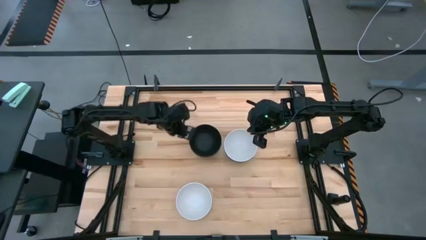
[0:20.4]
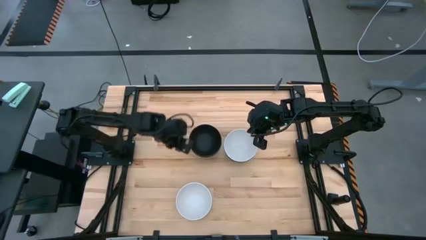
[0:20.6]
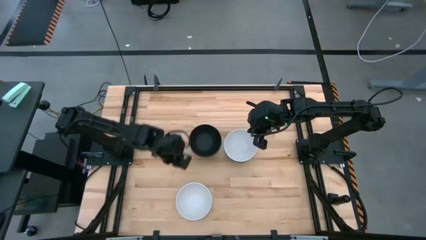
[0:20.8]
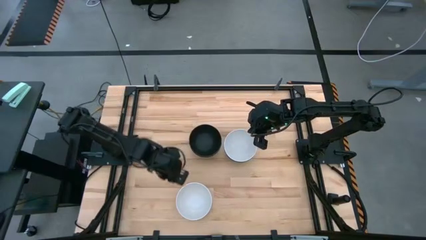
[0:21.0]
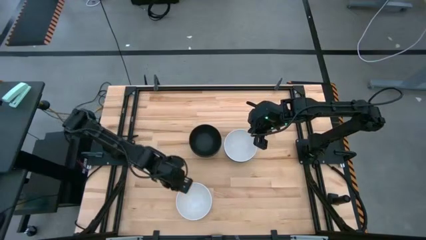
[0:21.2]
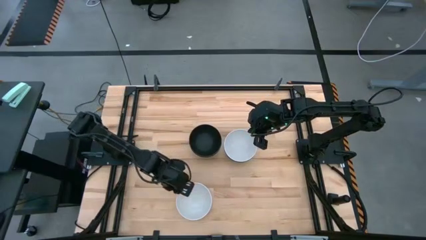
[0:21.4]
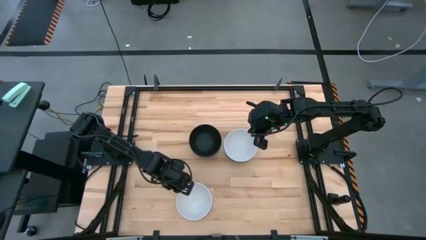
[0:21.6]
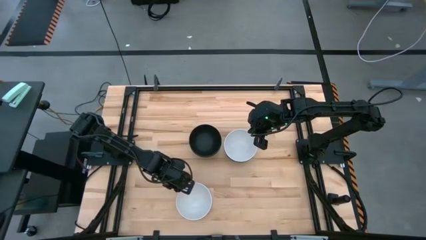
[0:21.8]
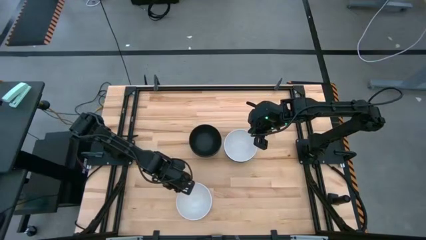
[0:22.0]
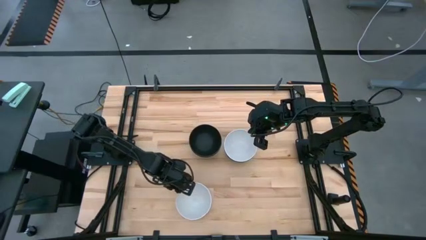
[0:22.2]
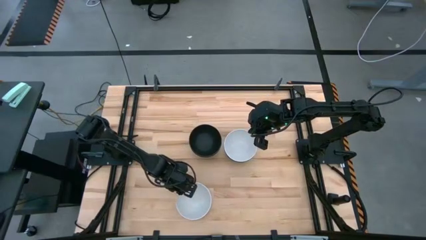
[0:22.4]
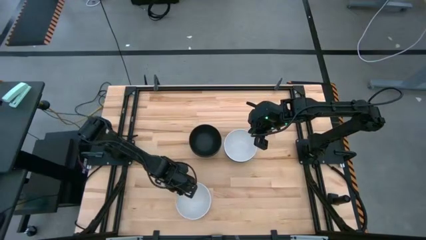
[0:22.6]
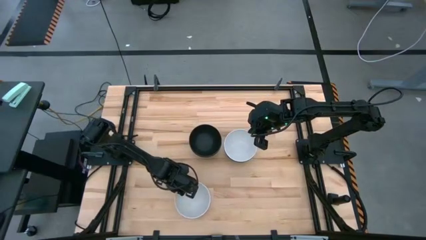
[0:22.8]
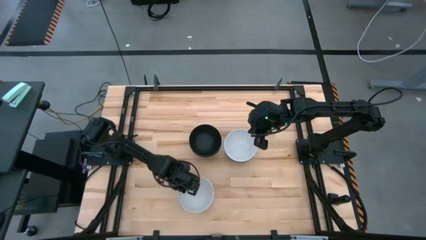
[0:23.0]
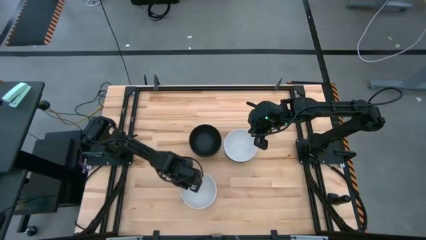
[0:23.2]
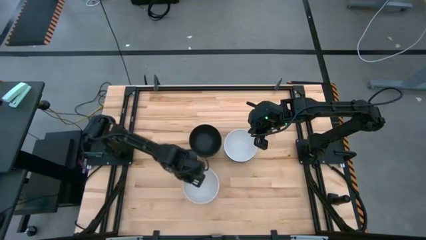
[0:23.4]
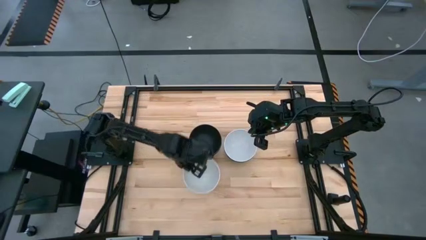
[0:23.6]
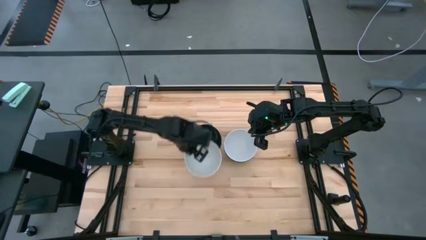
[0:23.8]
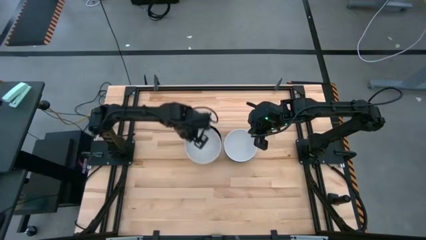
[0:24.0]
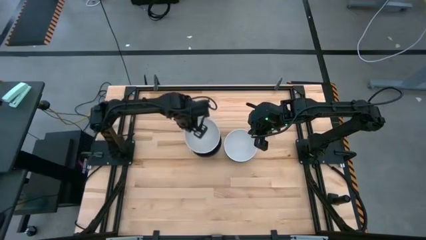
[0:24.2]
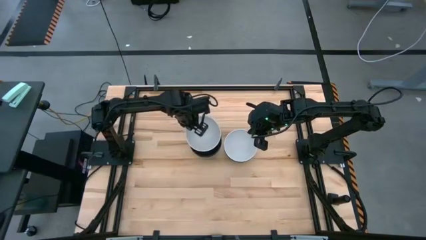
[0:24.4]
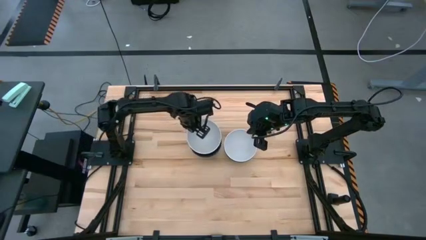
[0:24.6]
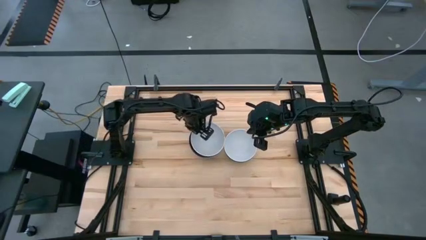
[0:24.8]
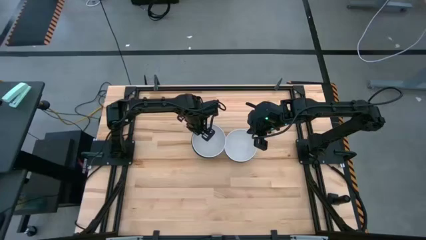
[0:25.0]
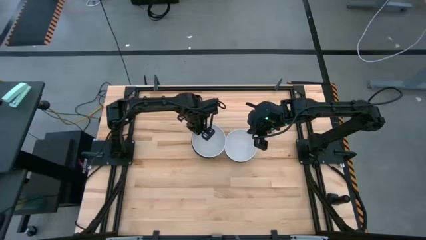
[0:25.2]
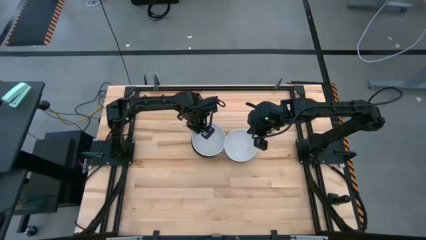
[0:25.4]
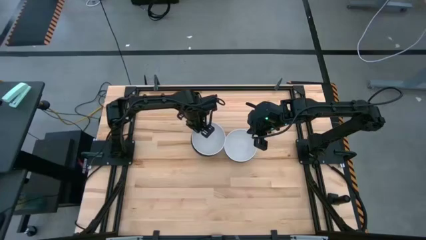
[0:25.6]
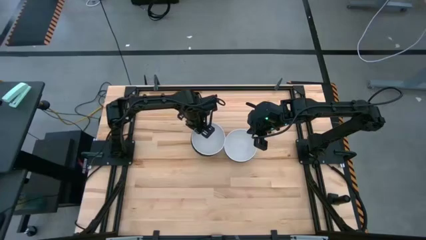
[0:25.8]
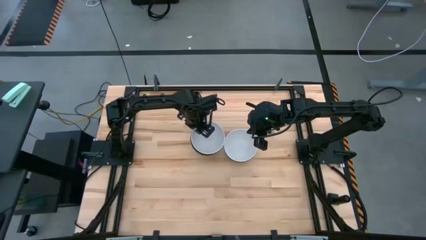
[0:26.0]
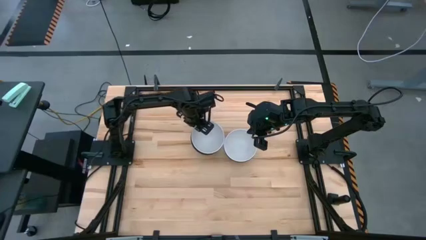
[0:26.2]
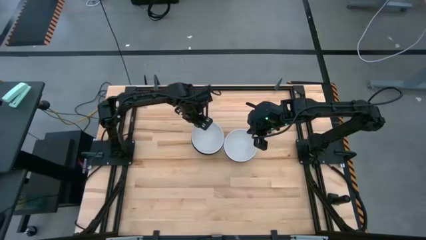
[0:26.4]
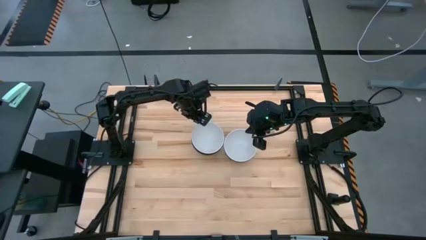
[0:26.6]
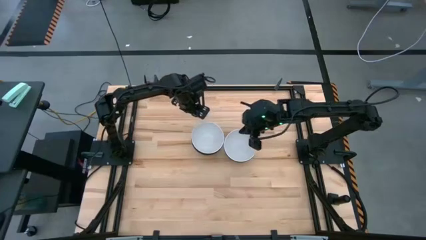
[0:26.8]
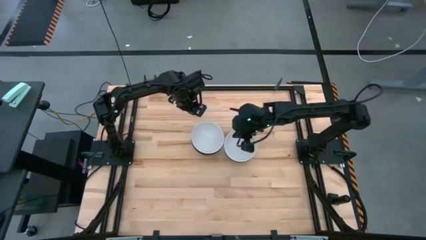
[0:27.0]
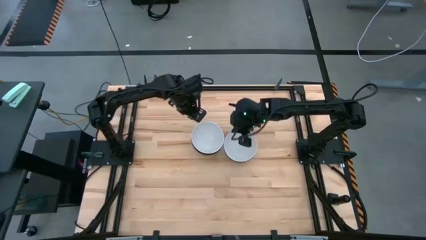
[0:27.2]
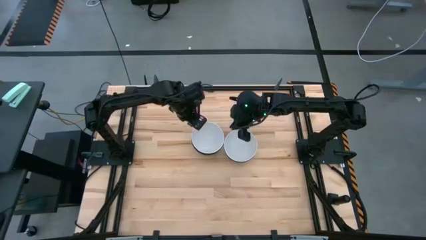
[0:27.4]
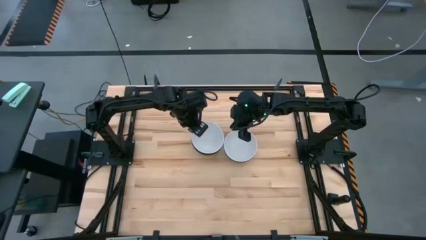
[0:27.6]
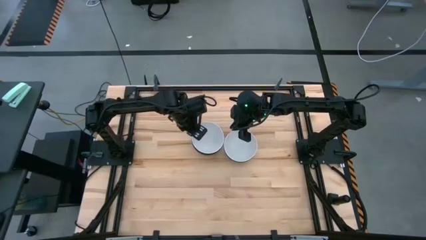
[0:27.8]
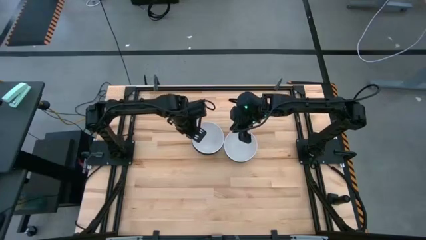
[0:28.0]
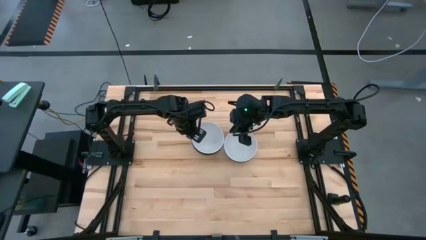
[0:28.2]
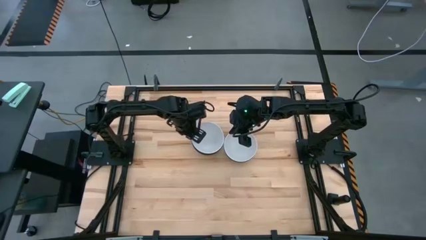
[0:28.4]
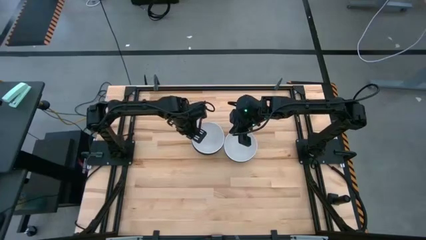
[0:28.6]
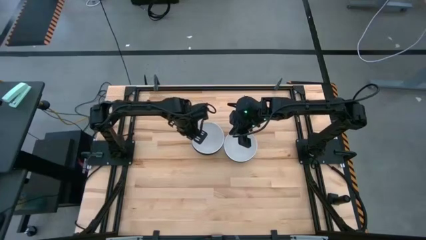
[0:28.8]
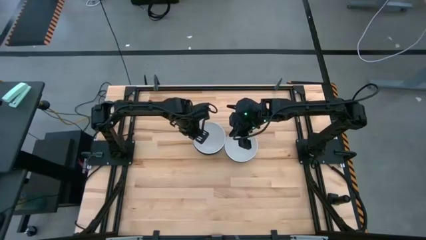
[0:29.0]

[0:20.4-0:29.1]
Task: Nest bowls inside each other
Stack the white bowl on top of the black bowl

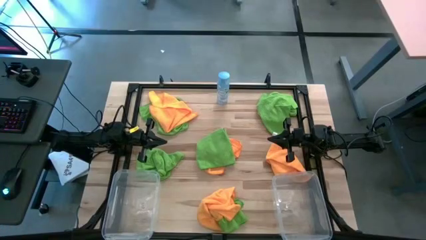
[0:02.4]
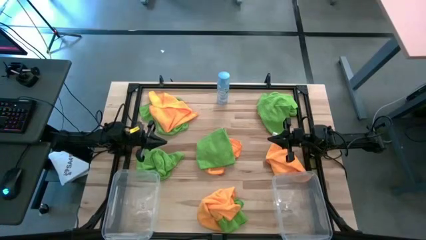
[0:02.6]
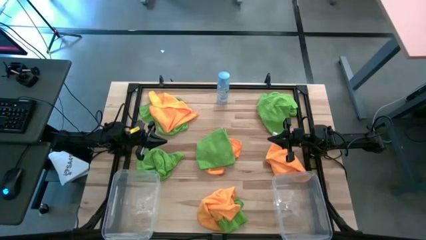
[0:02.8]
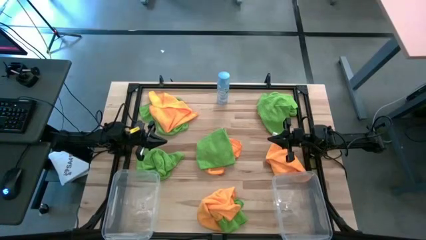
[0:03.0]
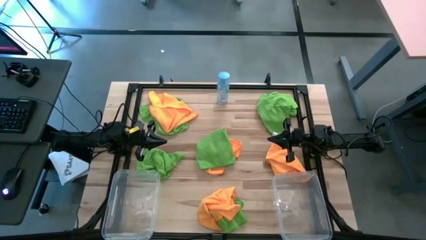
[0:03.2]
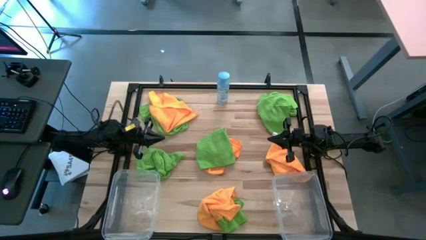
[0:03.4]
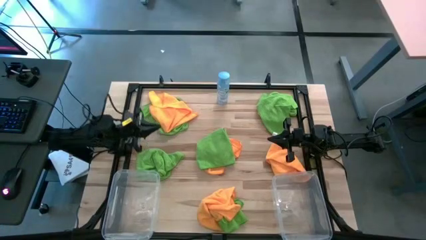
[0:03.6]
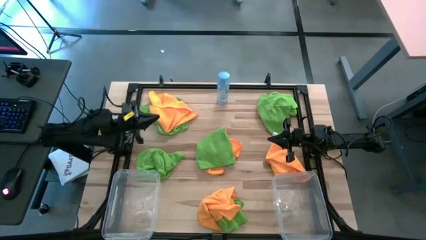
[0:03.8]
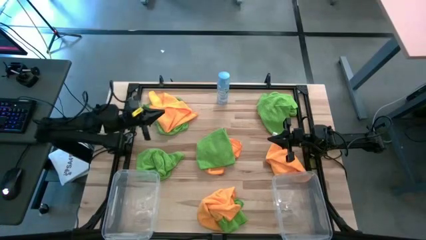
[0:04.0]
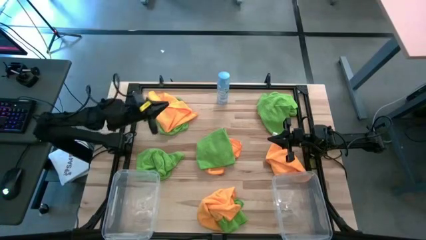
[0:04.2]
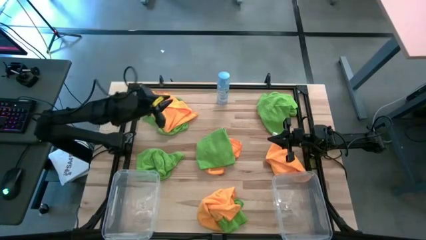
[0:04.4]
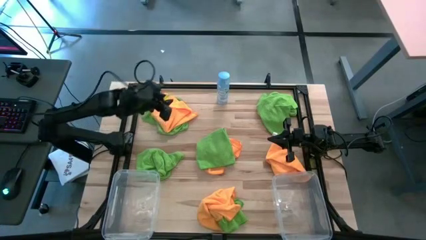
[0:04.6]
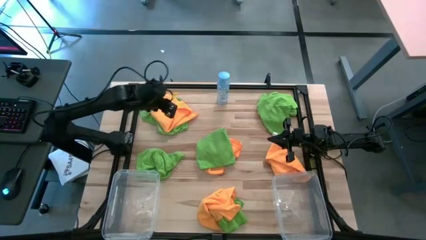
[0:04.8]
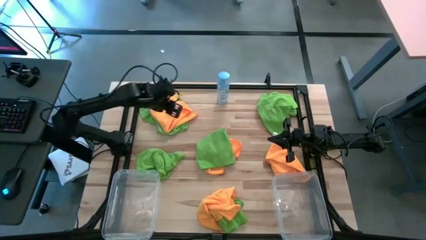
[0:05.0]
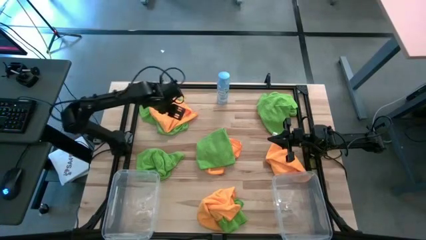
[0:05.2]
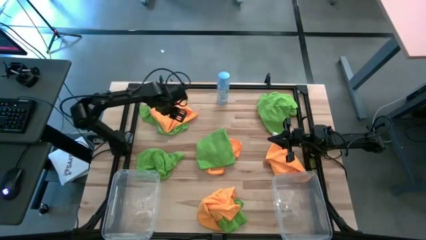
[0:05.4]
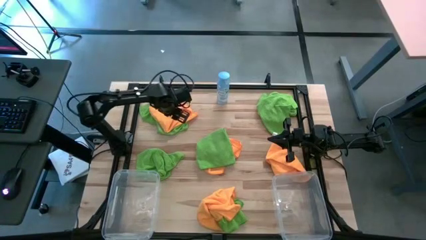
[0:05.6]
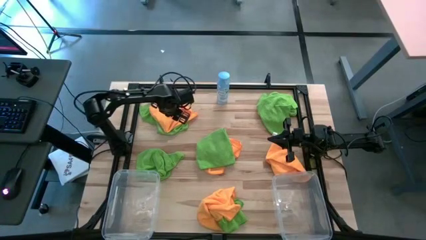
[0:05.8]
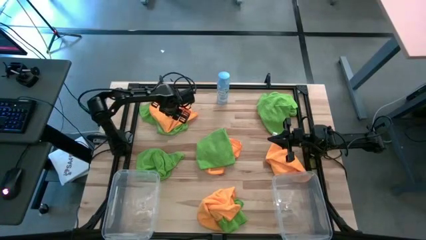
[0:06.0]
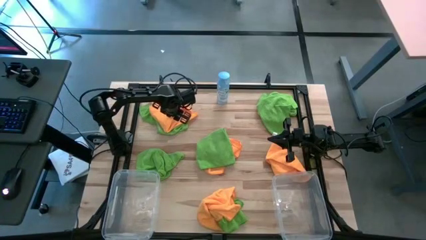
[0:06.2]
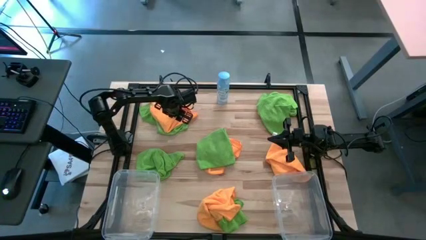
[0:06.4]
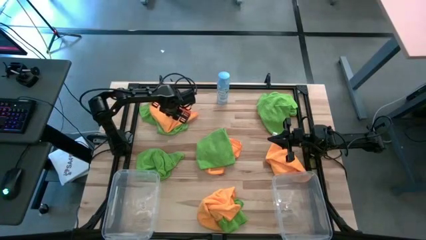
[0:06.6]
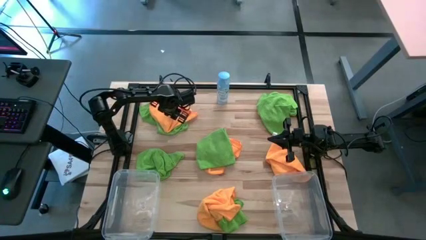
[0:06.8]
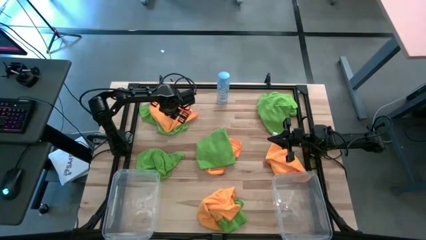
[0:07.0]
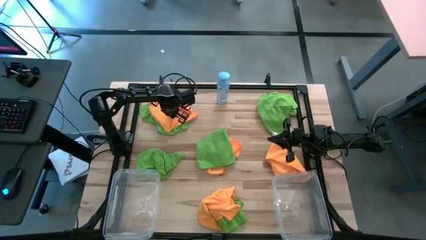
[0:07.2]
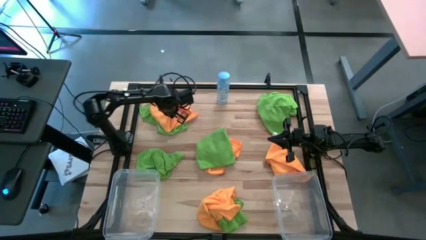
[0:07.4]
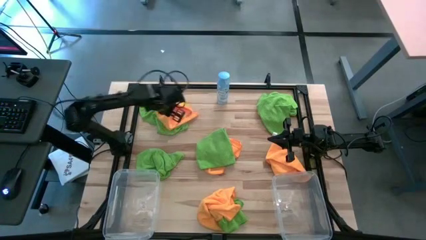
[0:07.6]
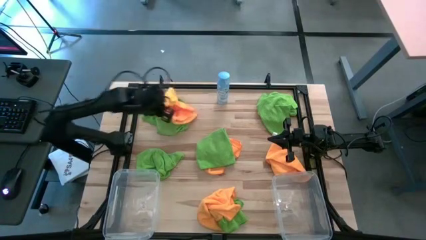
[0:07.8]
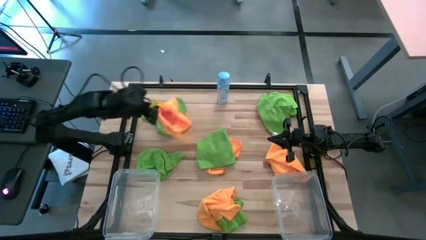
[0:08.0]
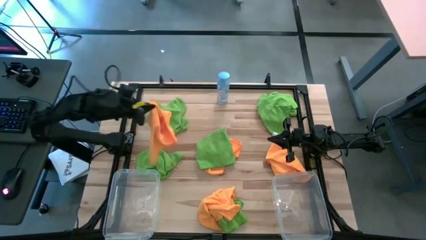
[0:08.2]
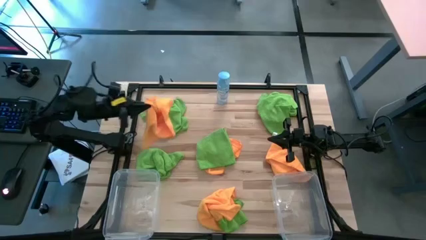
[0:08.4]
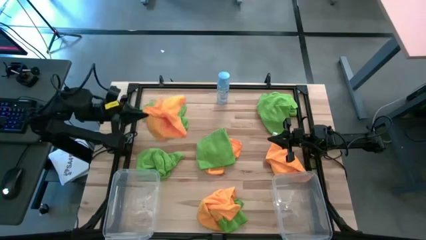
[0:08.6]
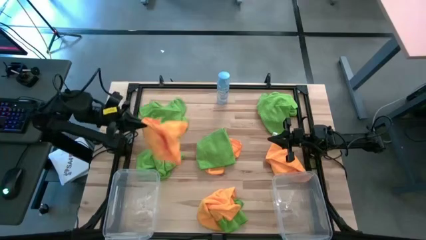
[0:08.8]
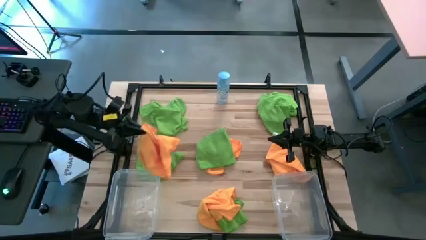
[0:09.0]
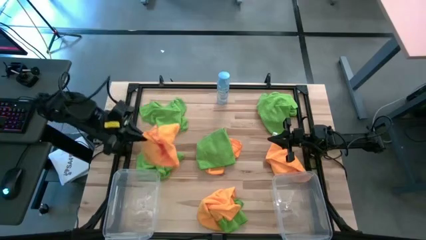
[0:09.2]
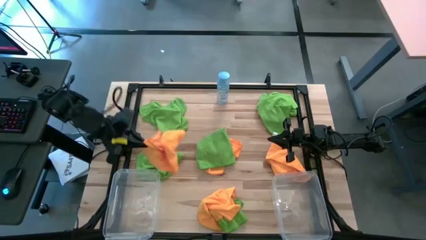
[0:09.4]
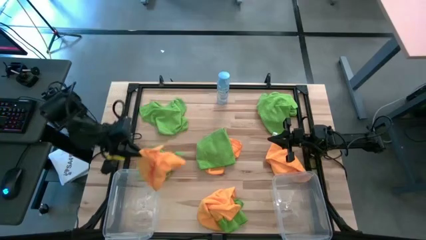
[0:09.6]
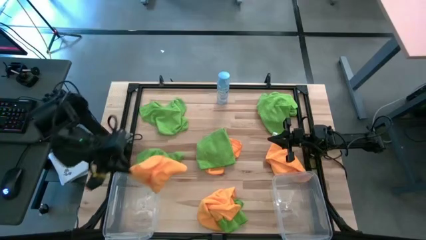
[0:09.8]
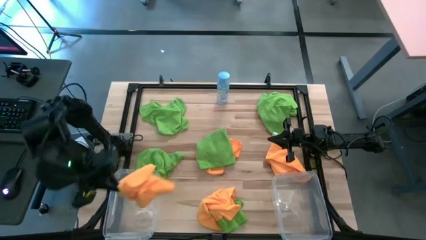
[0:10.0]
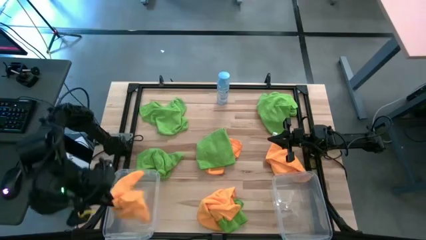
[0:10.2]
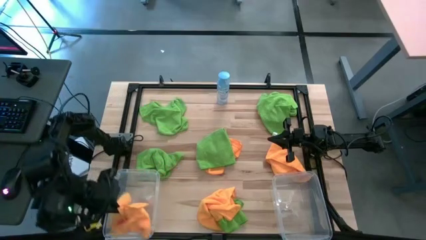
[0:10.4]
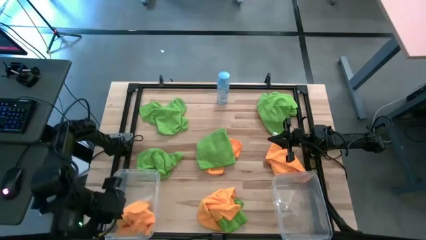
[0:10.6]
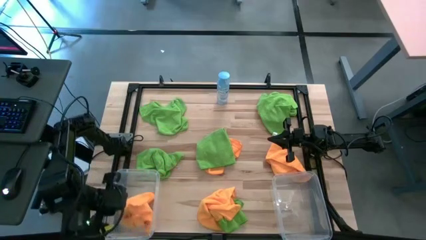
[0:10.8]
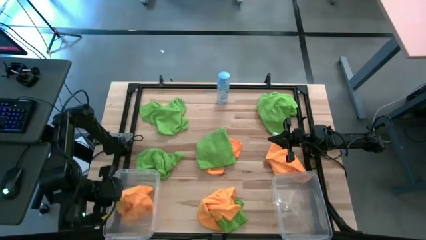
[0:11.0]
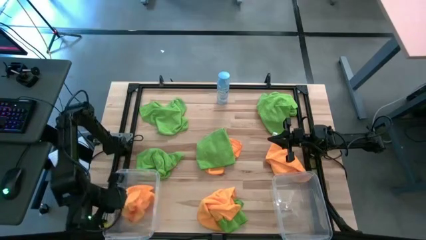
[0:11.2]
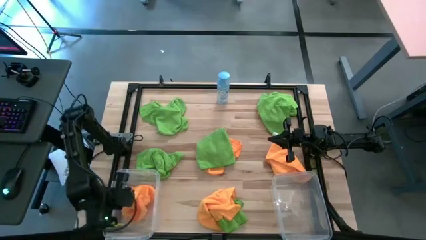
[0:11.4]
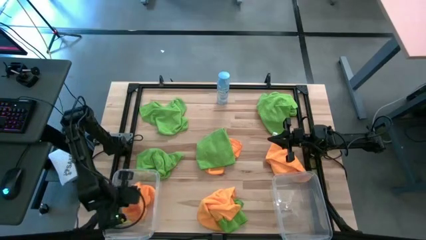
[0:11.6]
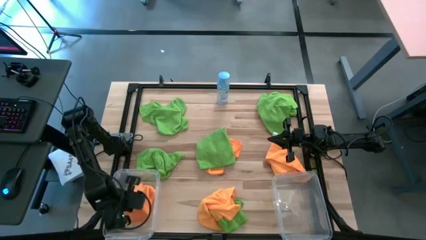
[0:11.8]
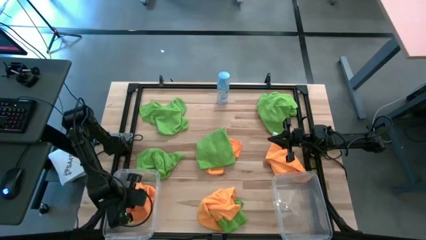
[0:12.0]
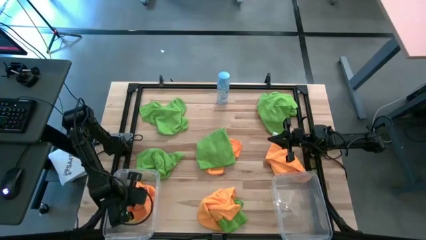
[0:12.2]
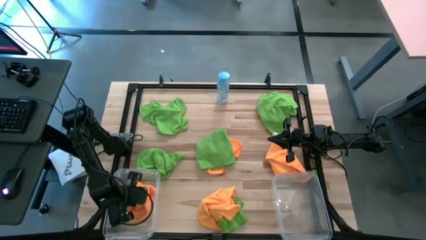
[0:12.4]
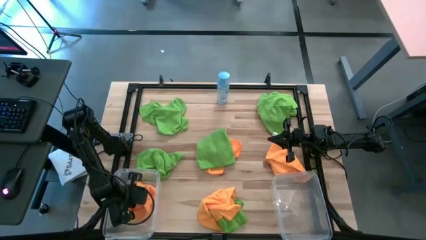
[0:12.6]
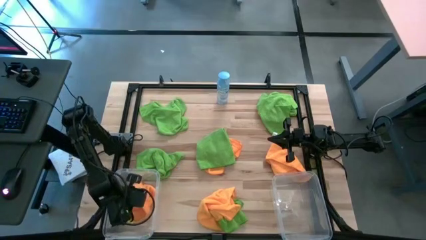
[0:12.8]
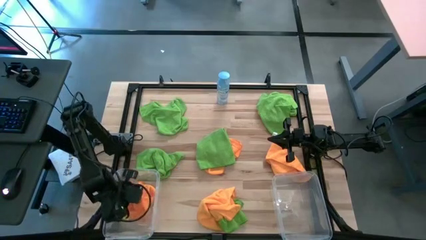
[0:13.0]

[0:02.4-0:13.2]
Task: Sort microfiber towel by color & place in baskets
Put the orange microfiber cloth into the left transparent bin
